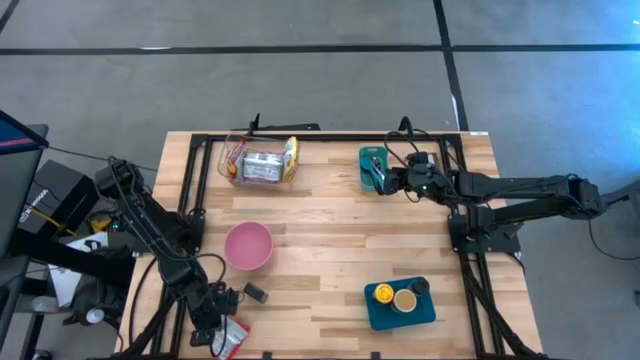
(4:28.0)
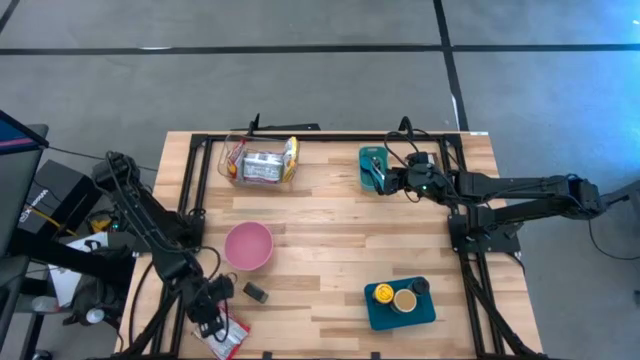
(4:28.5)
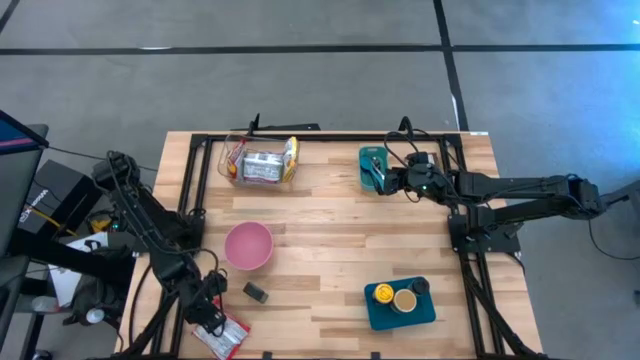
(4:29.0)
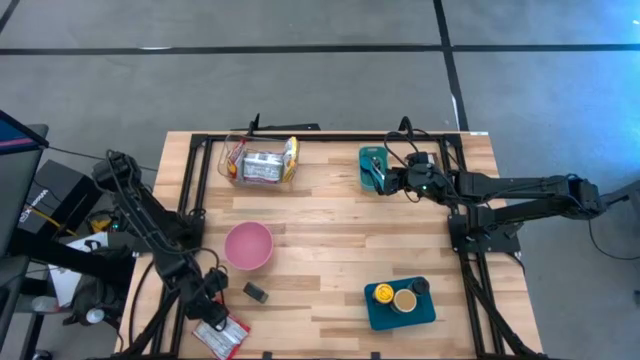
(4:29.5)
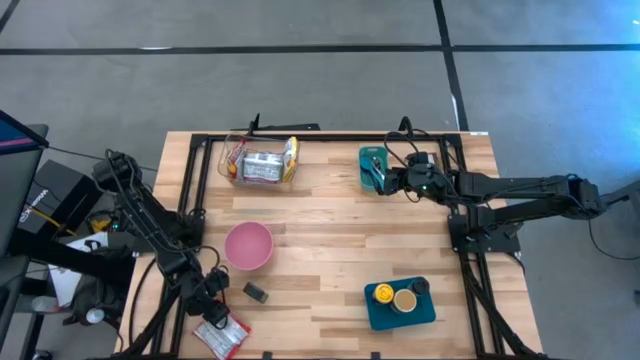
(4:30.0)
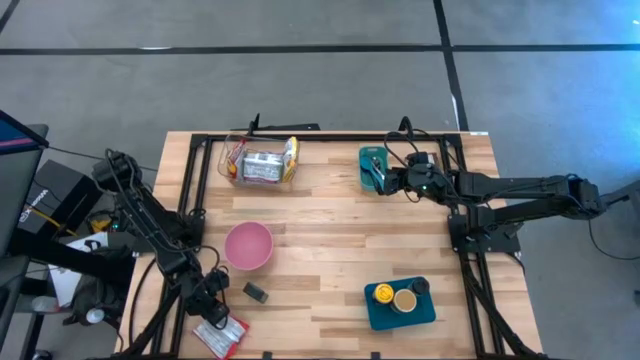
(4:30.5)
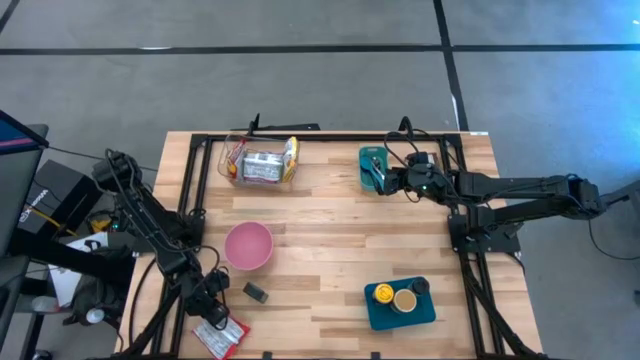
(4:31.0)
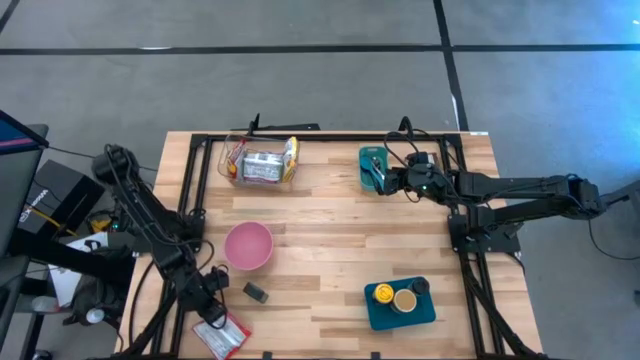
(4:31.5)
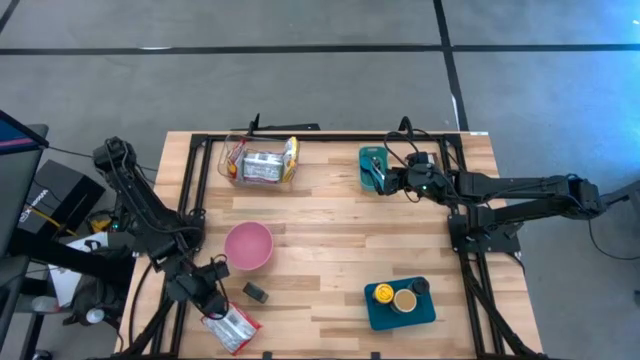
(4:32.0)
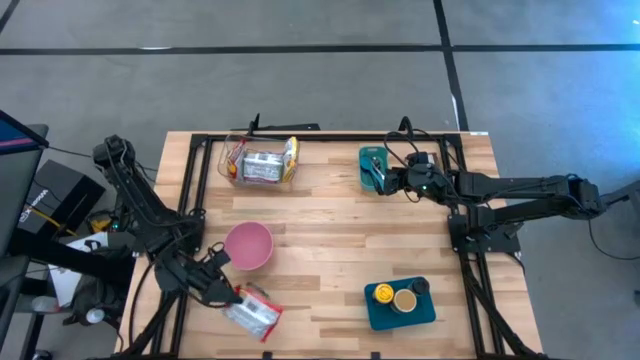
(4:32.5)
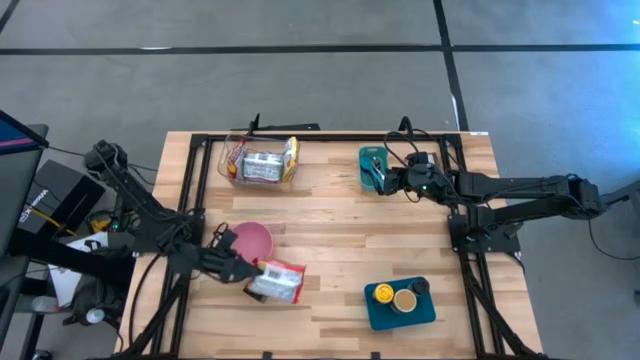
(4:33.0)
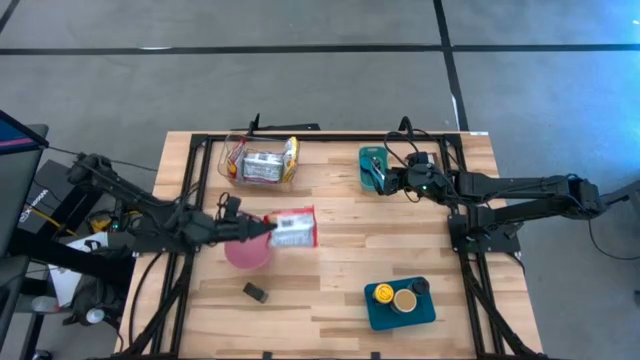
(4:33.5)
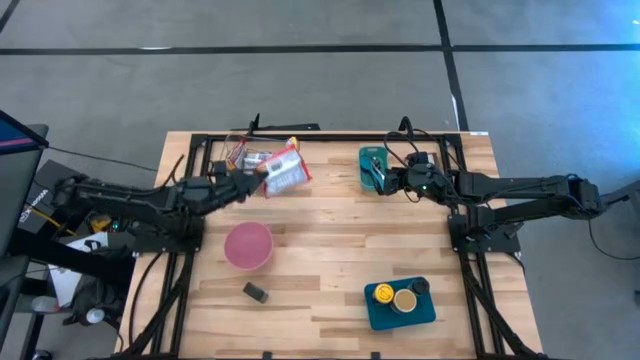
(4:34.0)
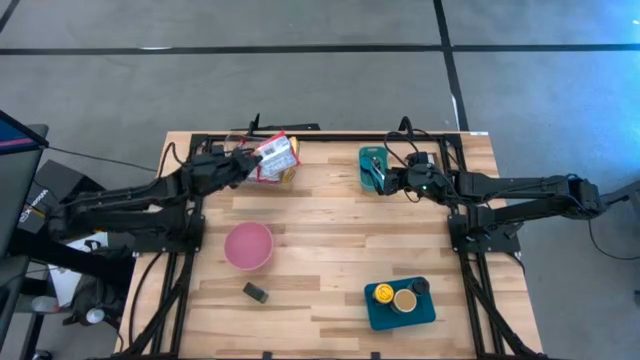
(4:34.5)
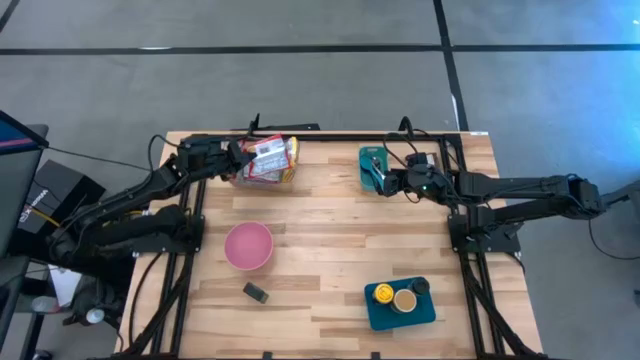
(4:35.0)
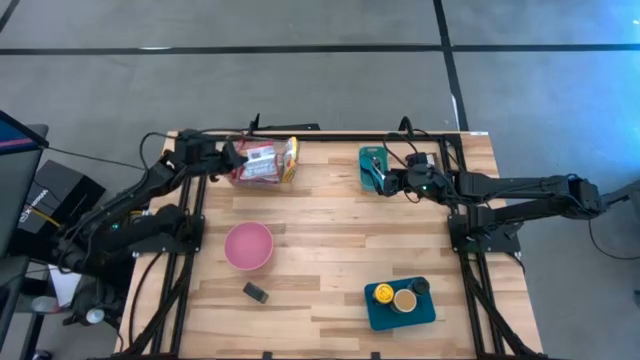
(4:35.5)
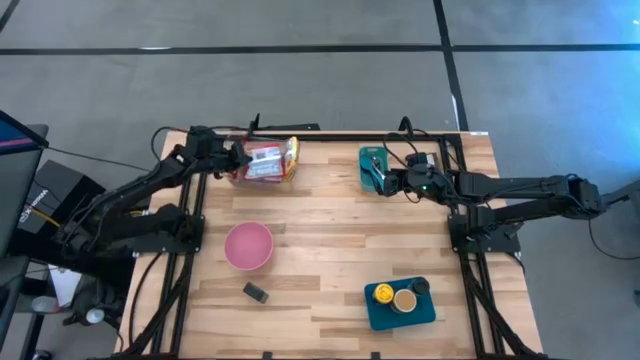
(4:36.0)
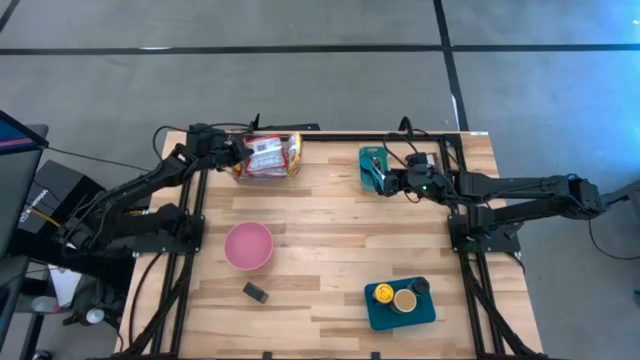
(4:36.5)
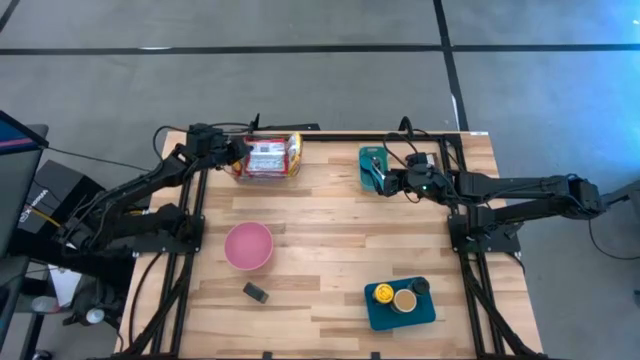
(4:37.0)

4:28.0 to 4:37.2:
Task: Pick & Place Food Item
Put the orange noodle pack into the transparent bin

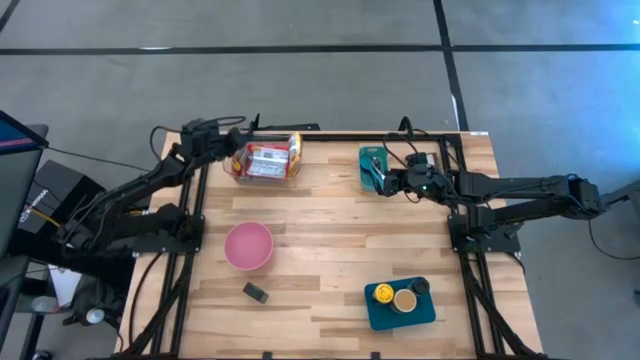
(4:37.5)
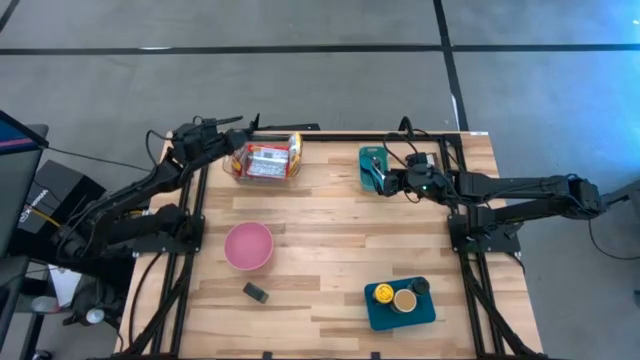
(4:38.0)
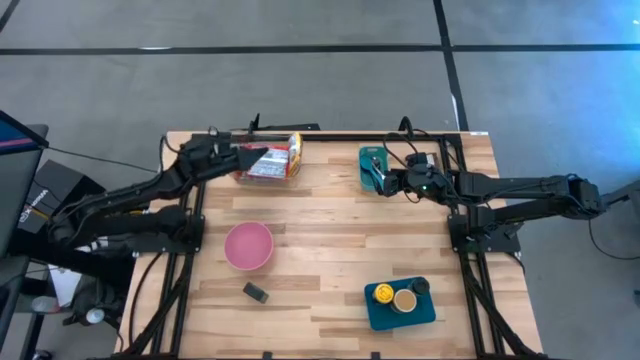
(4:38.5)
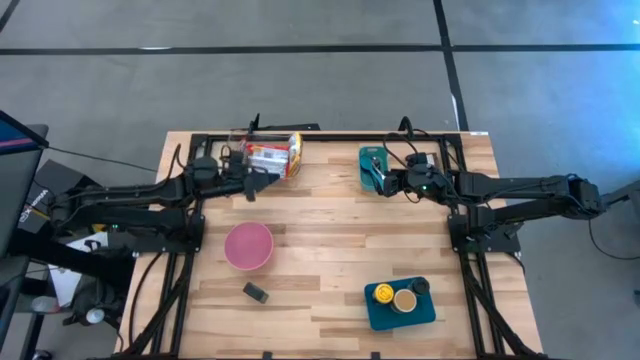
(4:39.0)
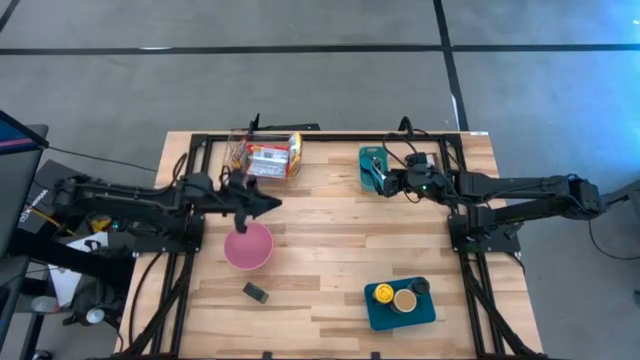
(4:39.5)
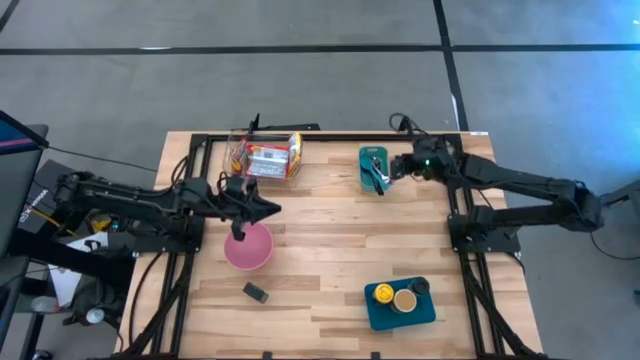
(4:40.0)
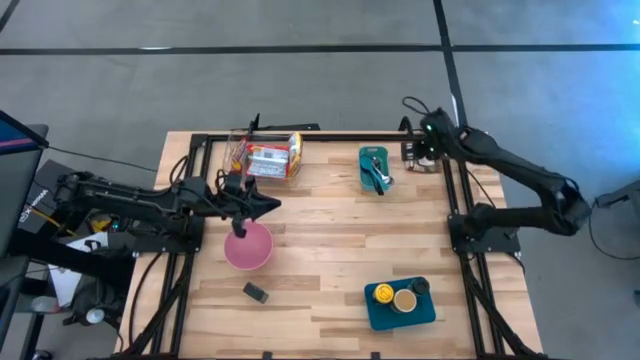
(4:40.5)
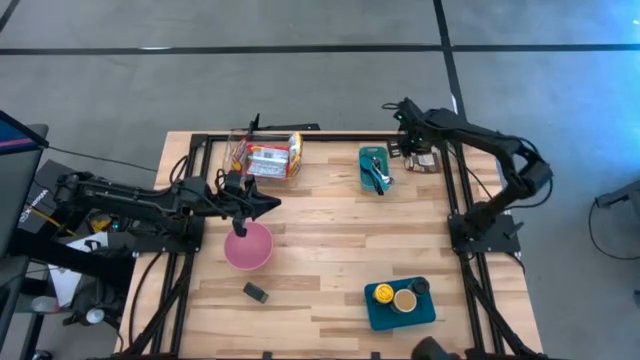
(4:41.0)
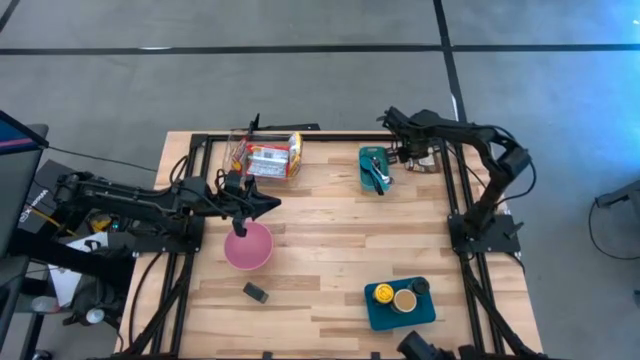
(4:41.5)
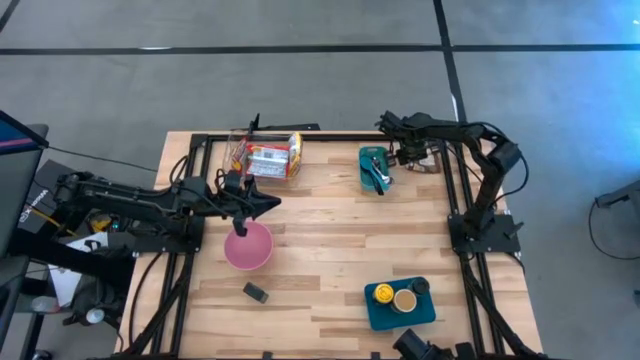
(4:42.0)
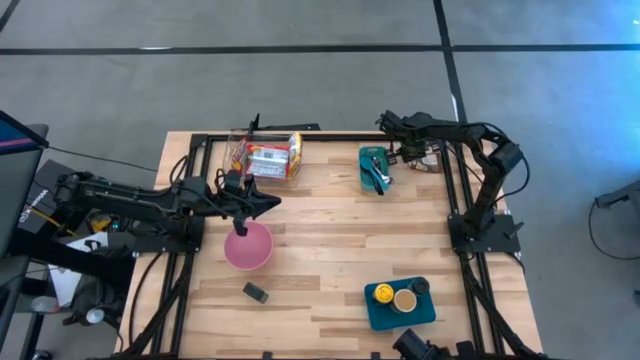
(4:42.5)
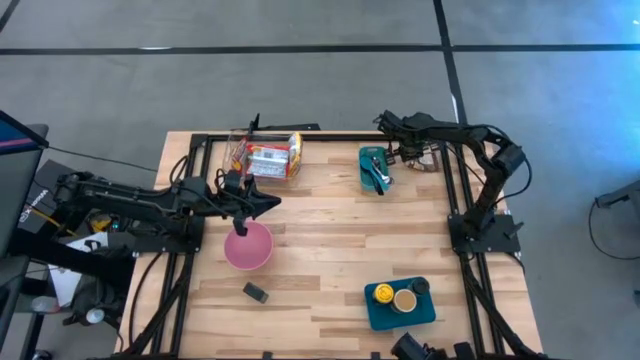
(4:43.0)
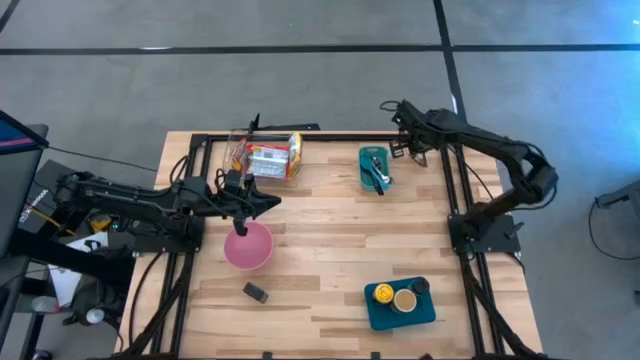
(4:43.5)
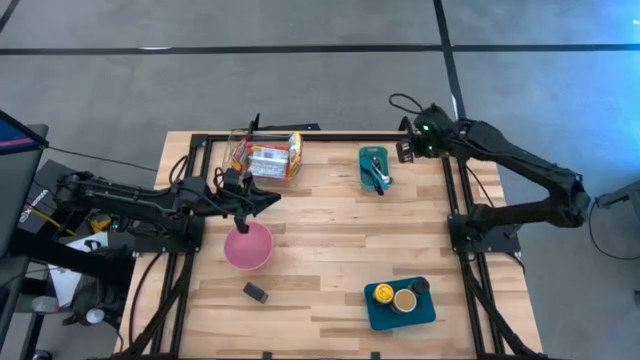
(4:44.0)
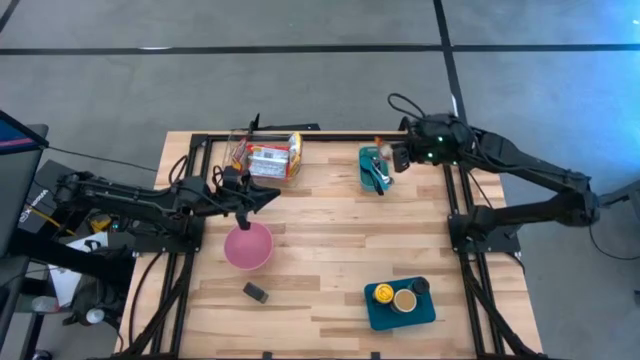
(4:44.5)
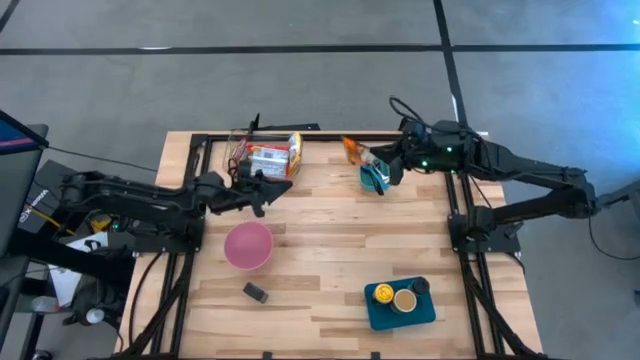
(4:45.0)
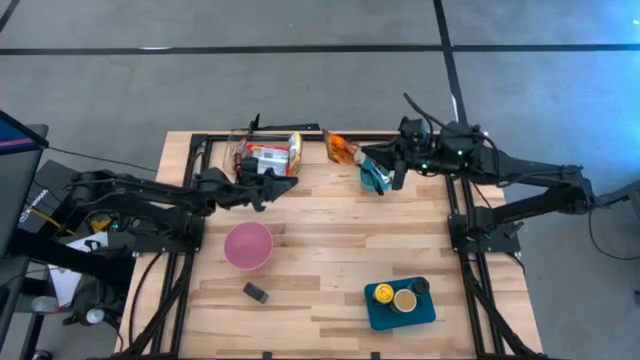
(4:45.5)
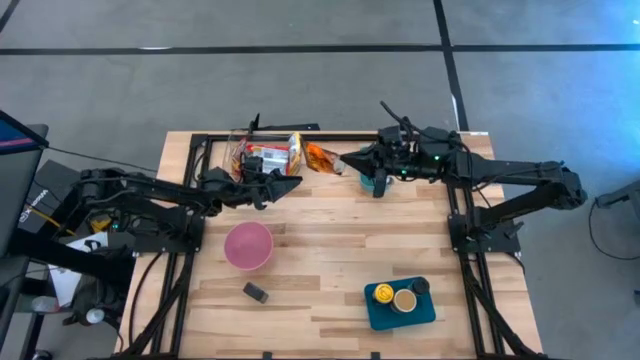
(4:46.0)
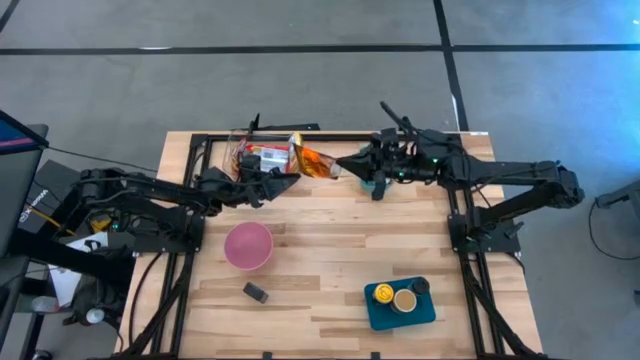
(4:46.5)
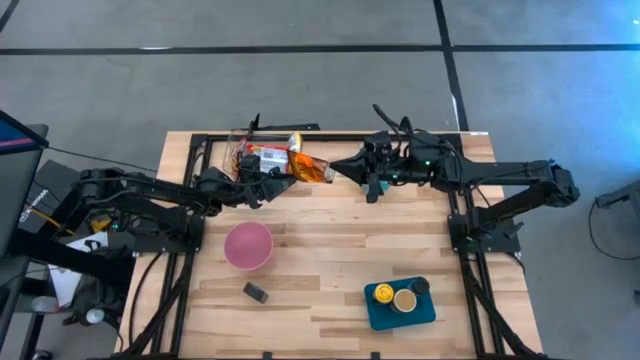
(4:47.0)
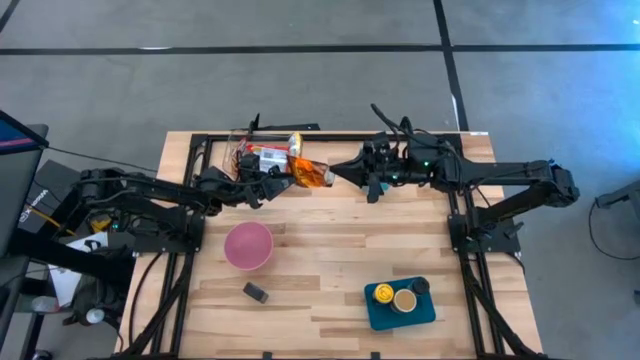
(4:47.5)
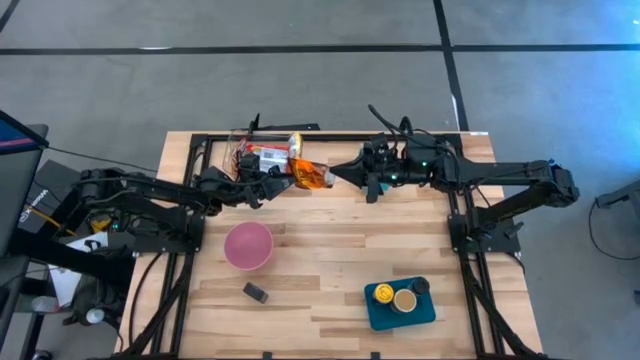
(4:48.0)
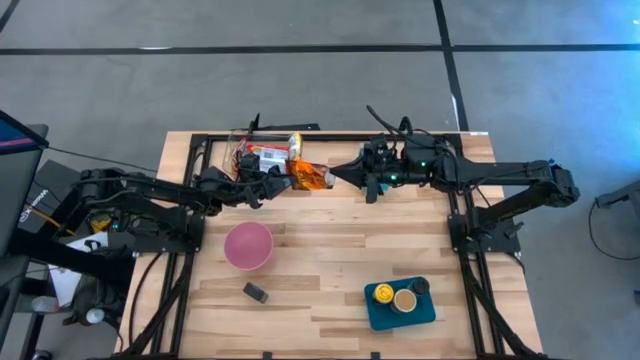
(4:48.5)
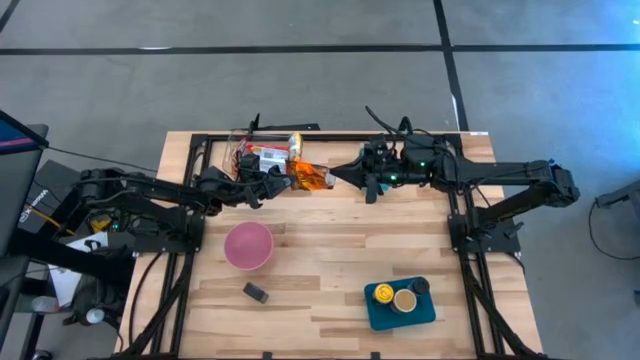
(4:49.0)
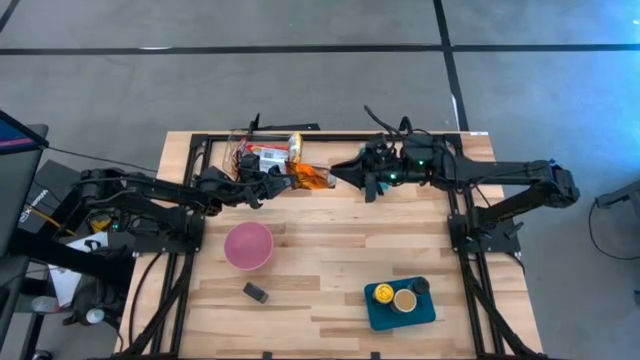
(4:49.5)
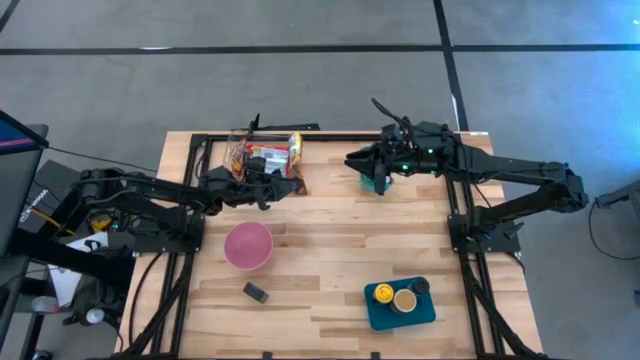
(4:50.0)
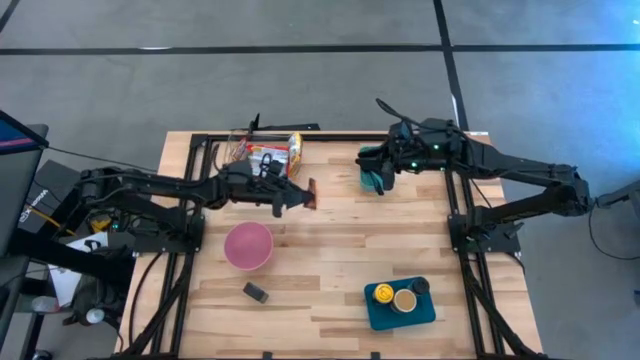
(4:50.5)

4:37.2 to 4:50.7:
Put the orange seasoning pack into the blue bin
